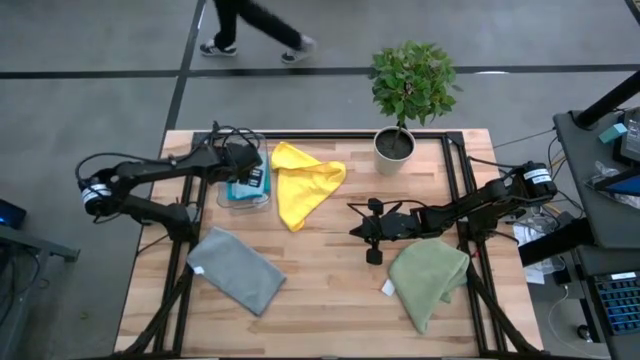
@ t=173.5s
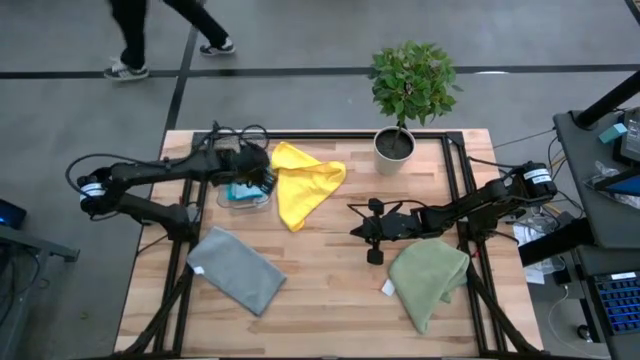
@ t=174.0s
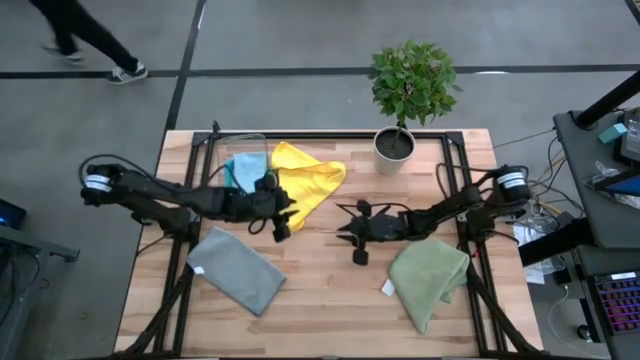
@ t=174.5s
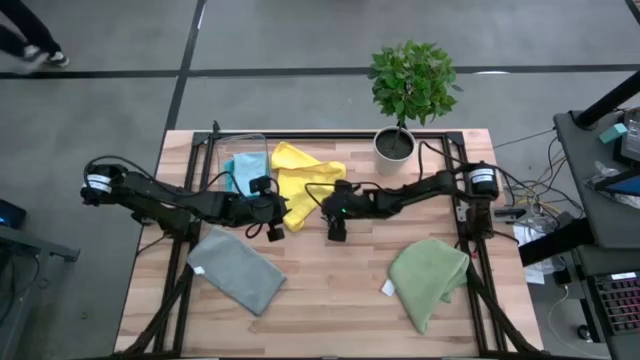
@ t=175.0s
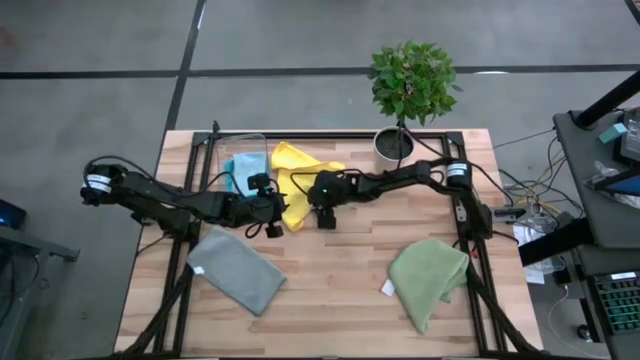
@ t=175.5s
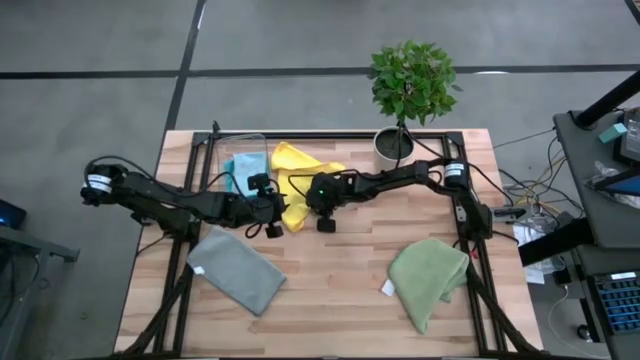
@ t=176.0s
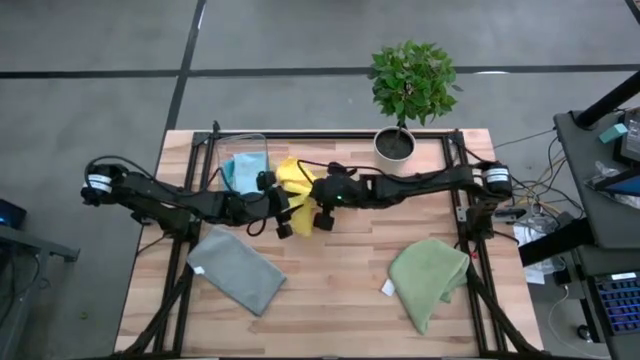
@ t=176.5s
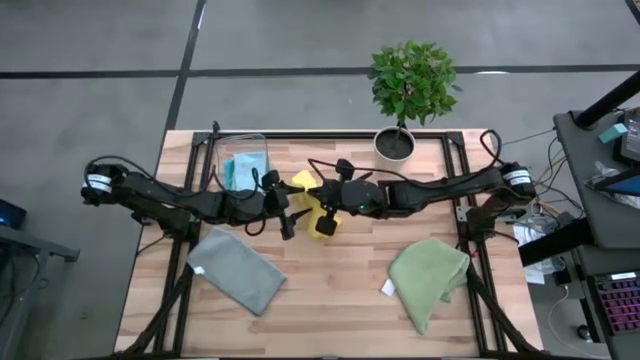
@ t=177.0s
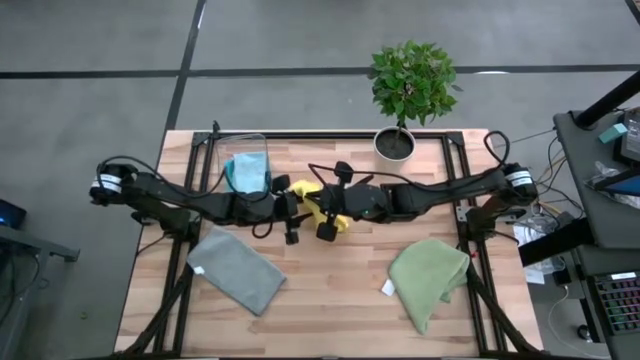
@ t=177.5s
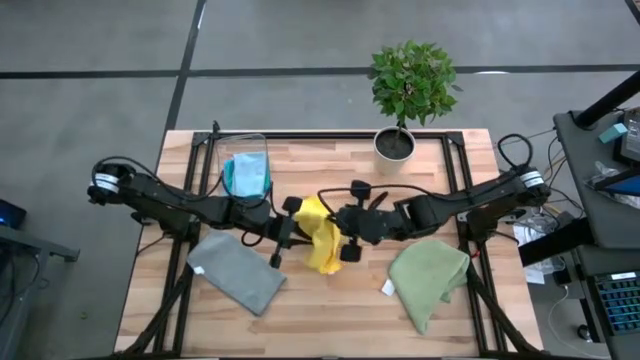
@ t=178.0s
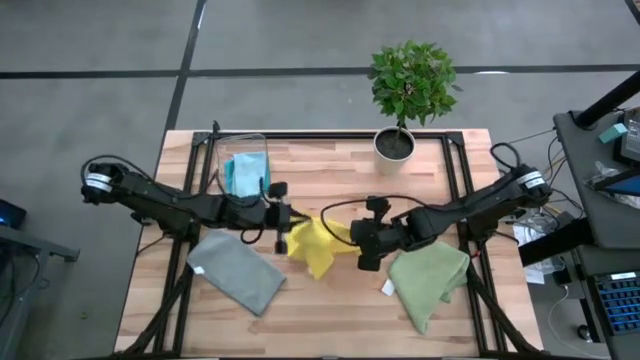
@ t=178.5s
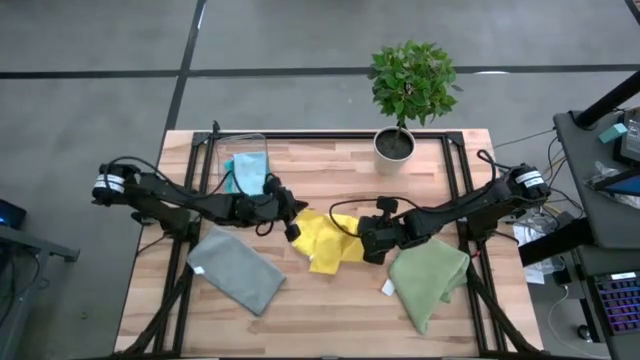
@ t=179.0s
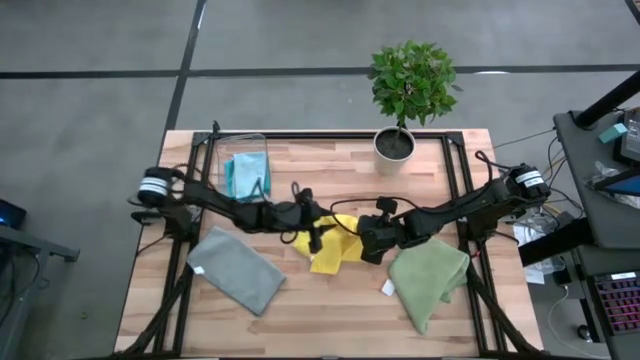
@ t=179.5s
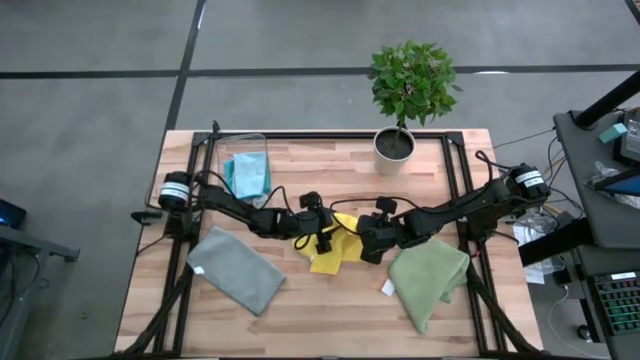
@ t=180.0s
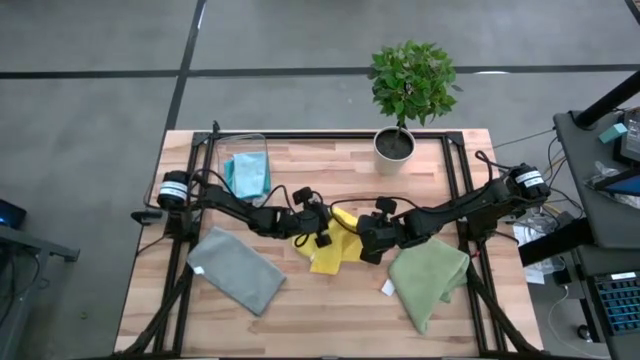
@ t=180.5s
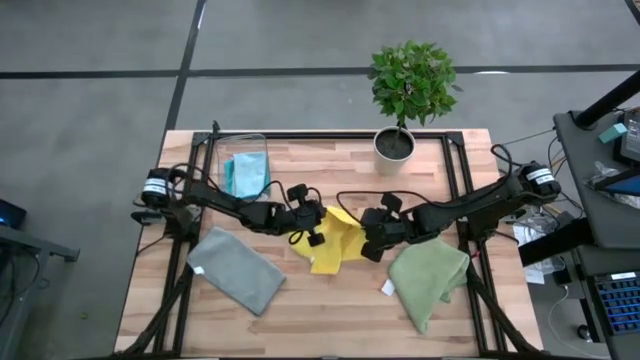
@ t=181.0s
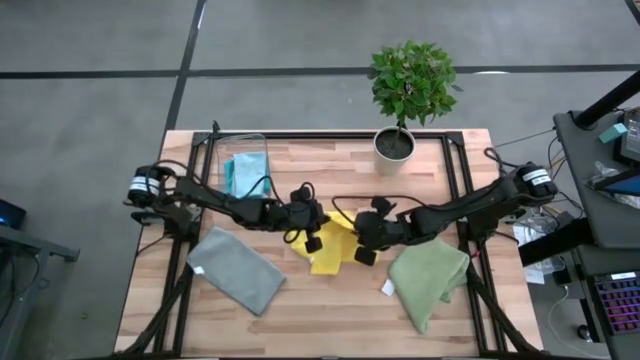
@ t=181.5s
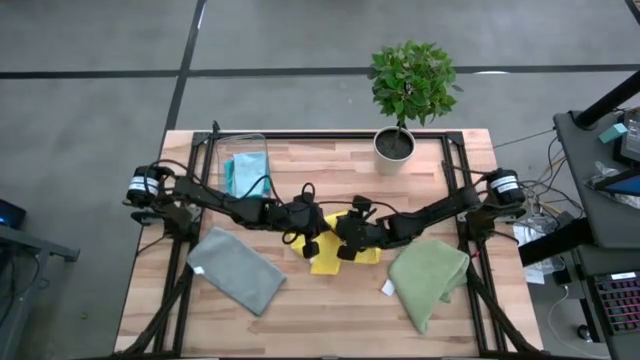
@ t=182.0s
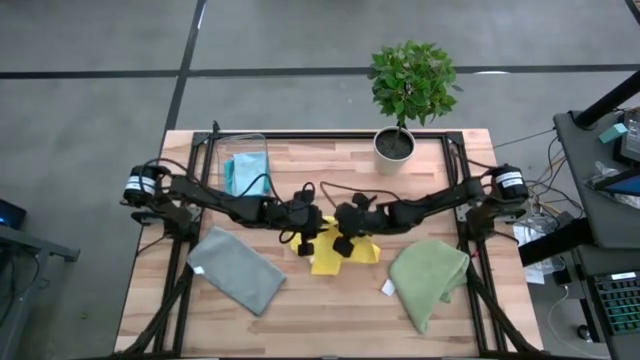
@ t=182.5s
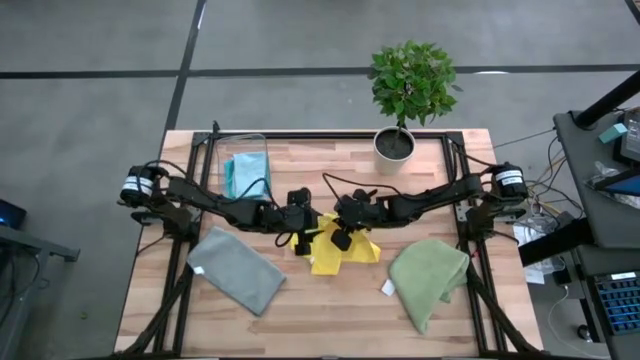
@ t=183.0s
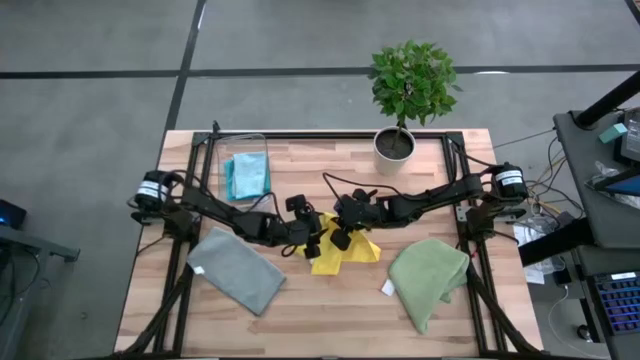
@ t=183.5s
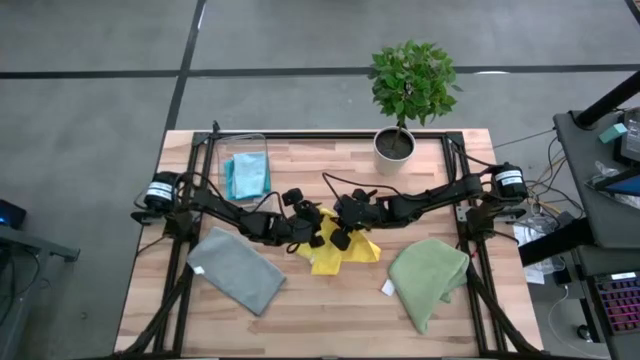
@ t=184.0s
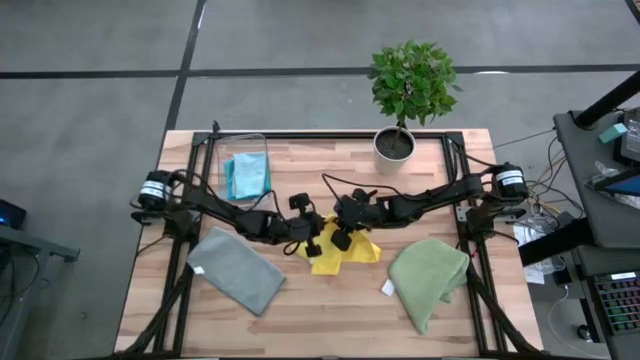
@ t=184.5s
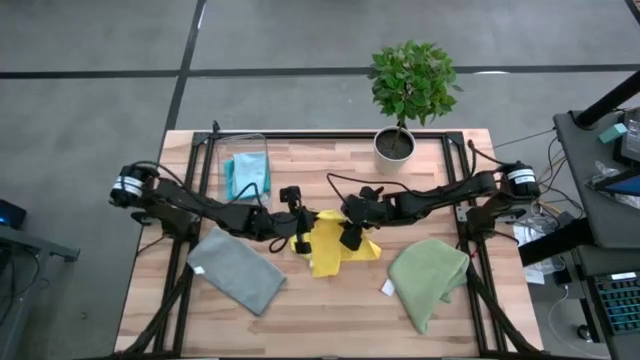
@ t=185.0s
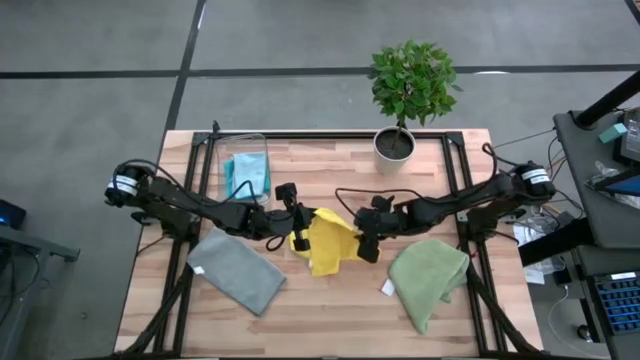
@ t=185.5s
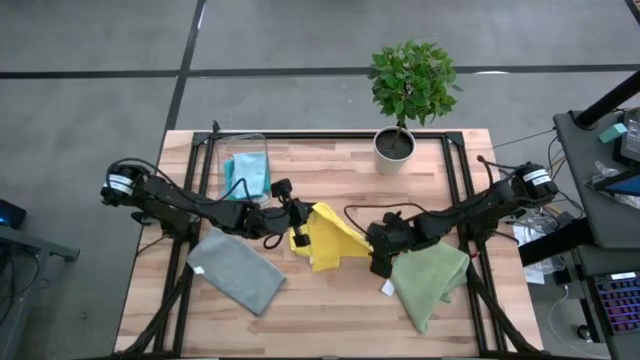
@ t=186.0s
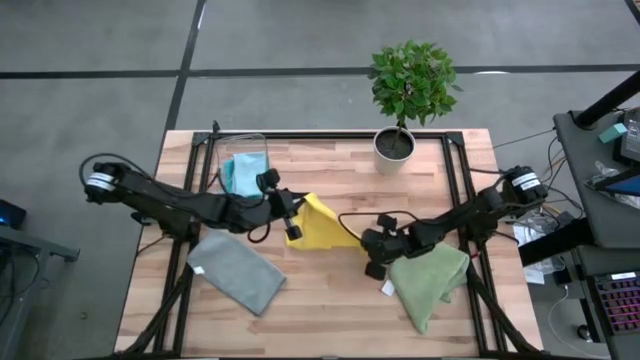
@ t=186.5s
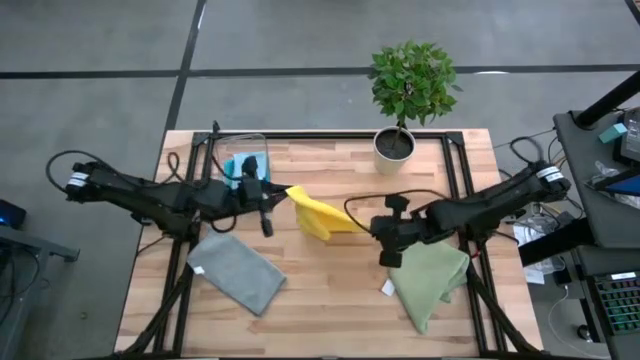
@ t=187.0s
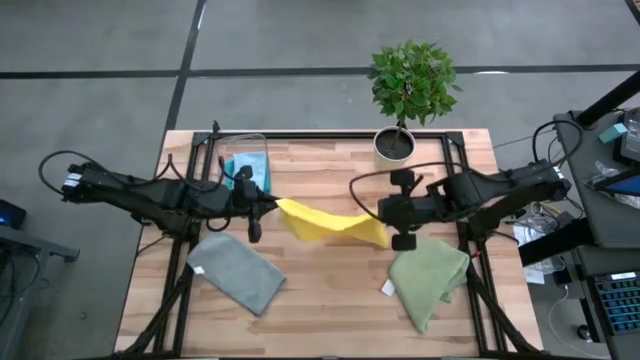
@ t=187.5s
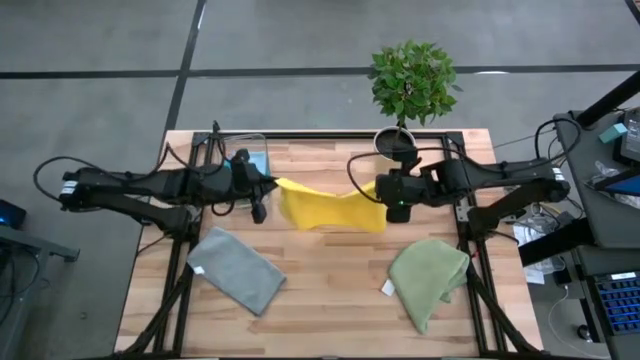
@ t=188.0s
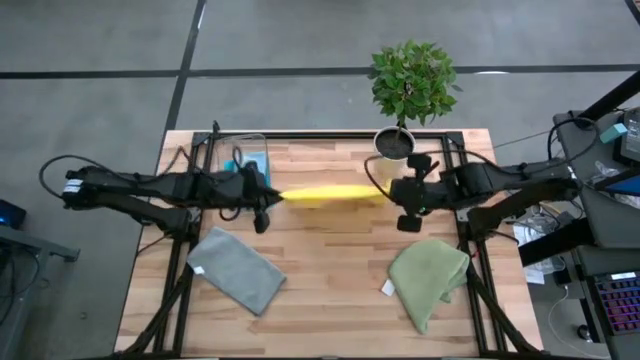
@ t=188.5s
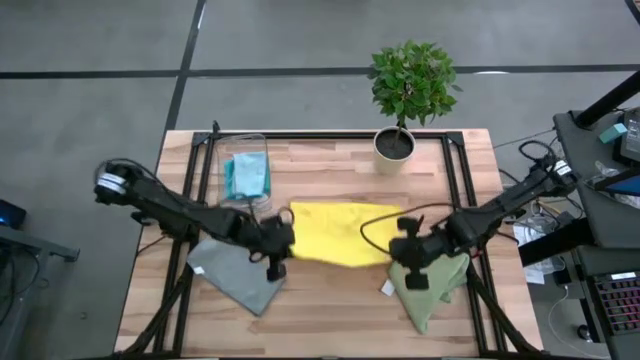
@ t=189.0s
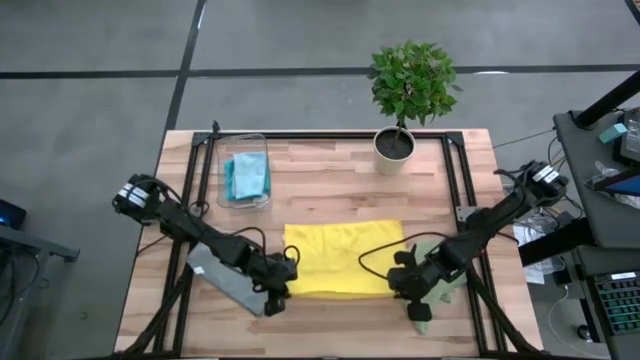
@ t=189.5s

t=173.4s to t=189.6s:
Task: Fold microfiber towels
Fold the yellow microfiber towel

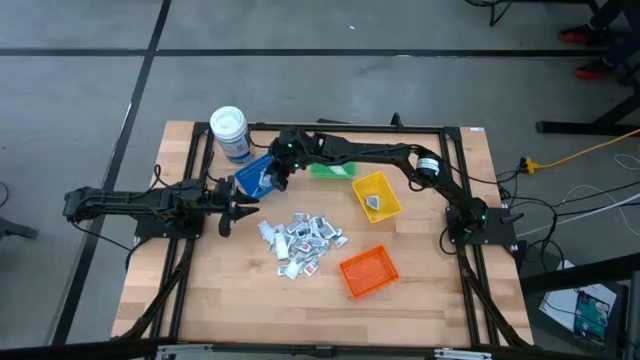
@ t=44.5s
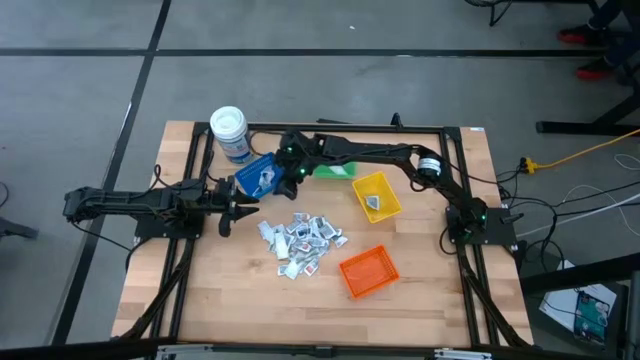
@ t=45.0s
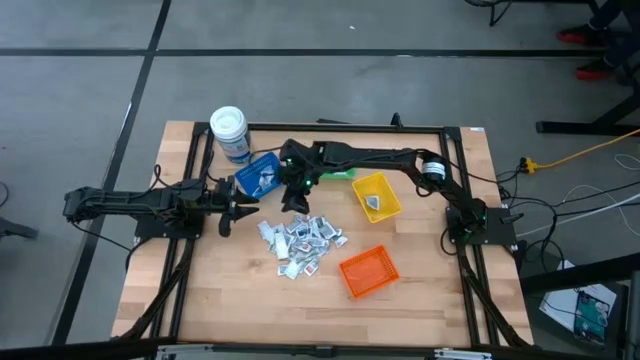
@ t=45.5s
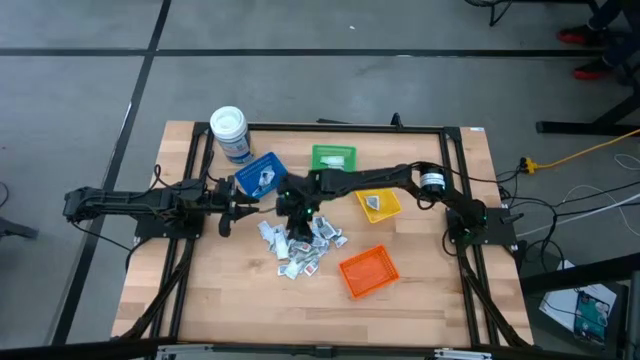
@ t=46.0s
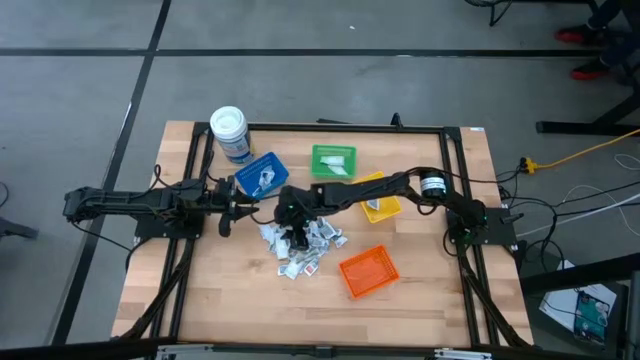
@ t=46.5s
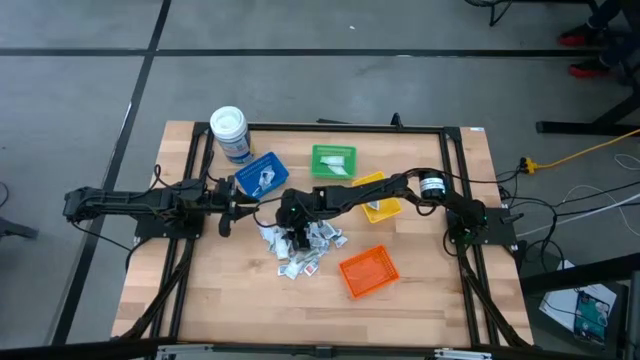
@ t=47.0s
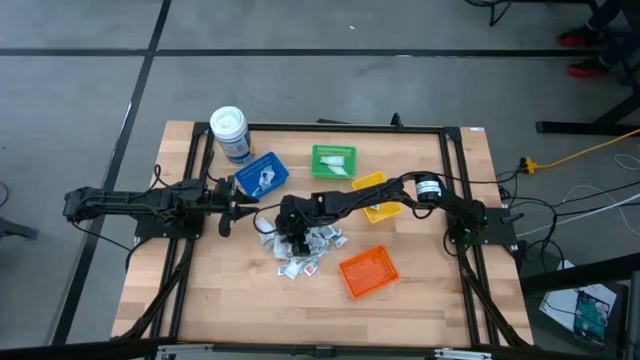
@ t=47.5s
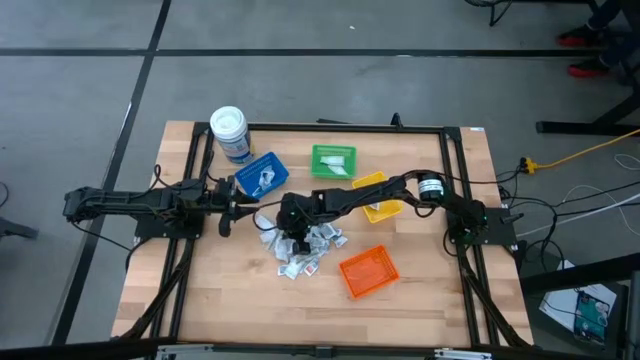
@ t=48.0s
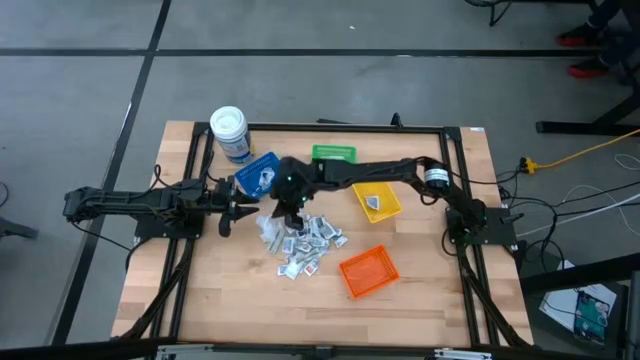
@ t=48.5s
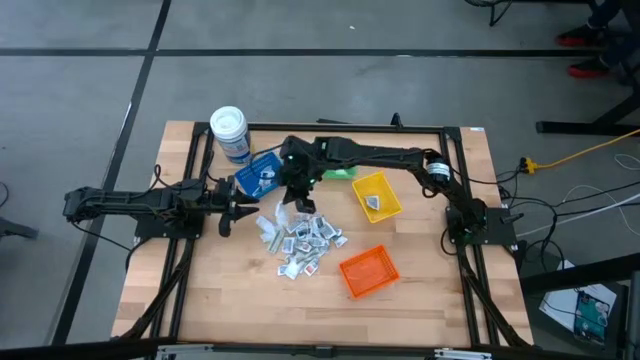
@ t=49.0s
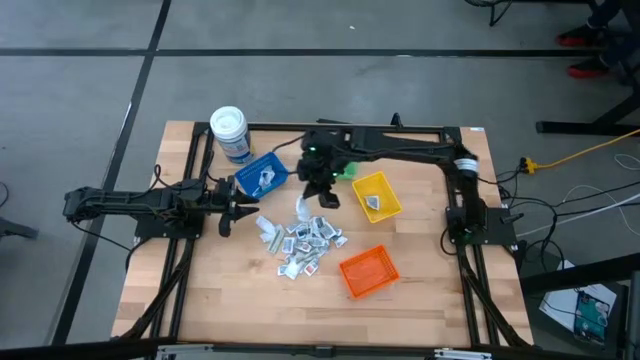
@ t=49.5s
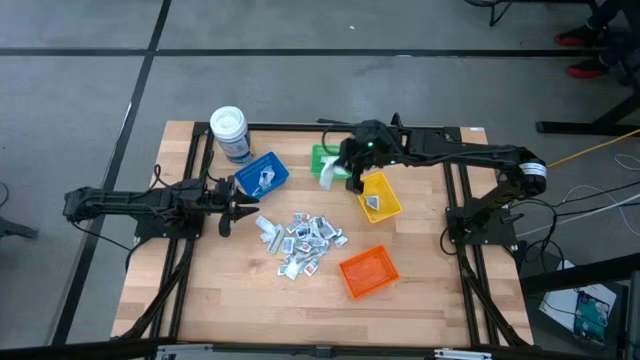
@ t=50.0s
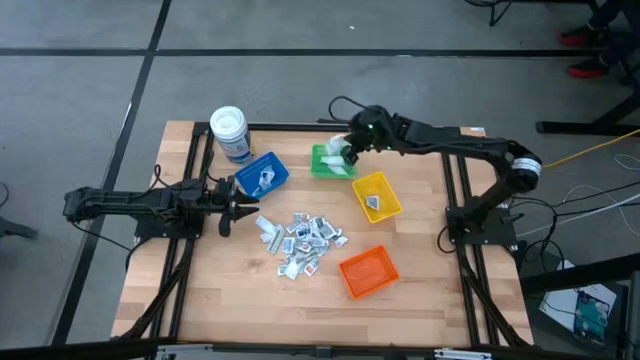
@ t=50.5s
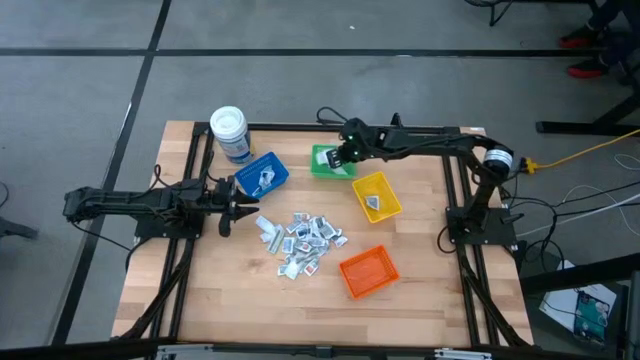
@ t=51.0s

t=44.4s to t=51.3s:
Task: Pick & Place First Aid Supplies
Put the white bandage into the green bin
